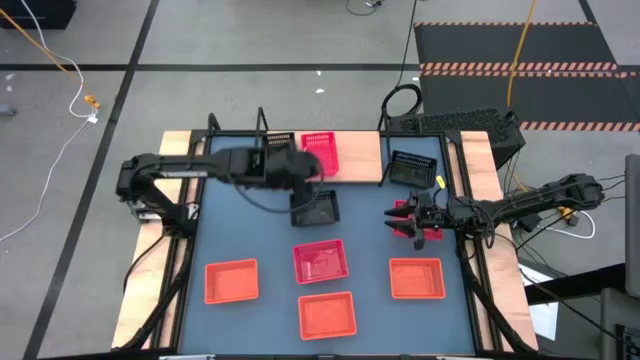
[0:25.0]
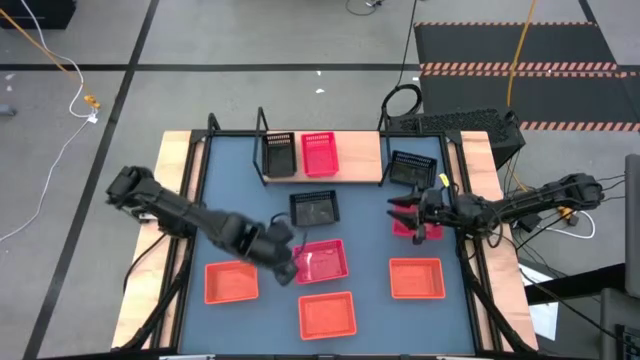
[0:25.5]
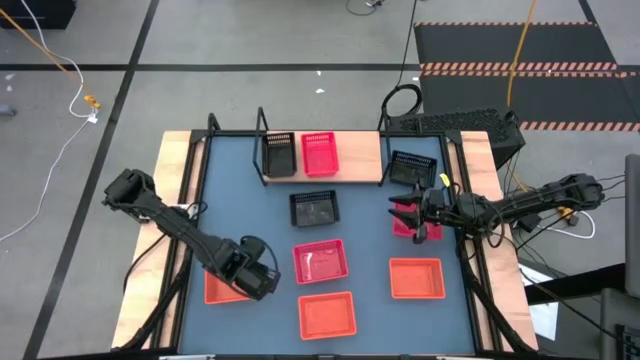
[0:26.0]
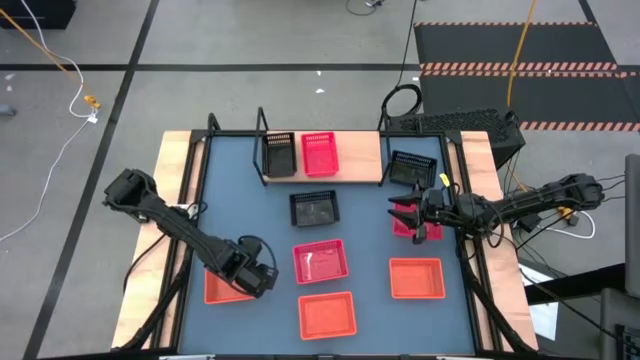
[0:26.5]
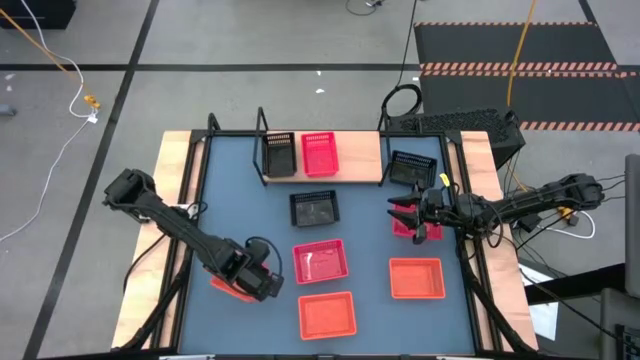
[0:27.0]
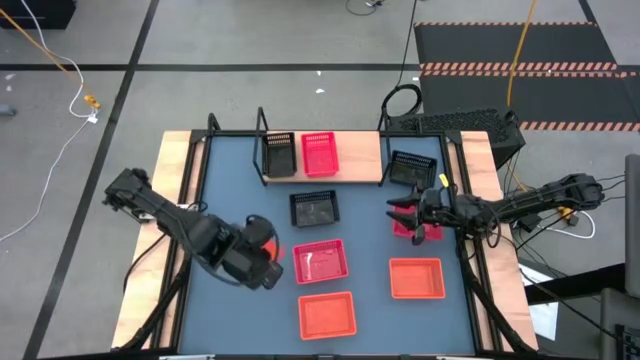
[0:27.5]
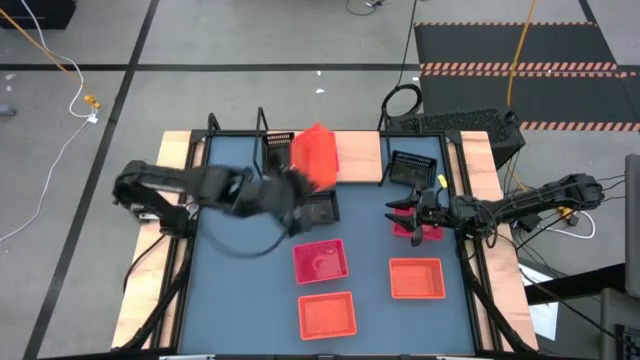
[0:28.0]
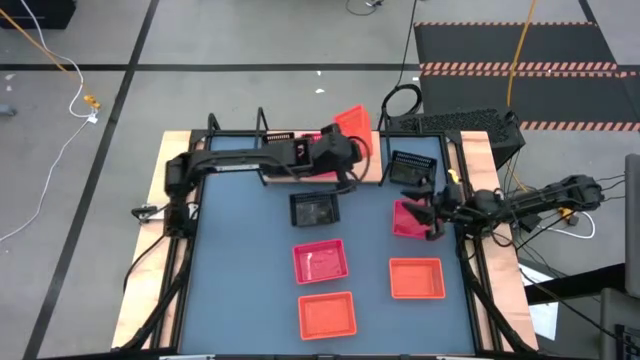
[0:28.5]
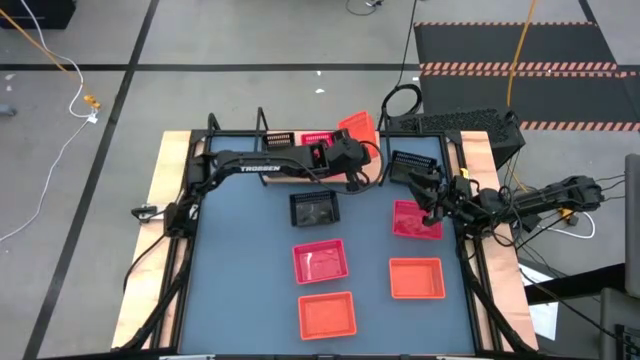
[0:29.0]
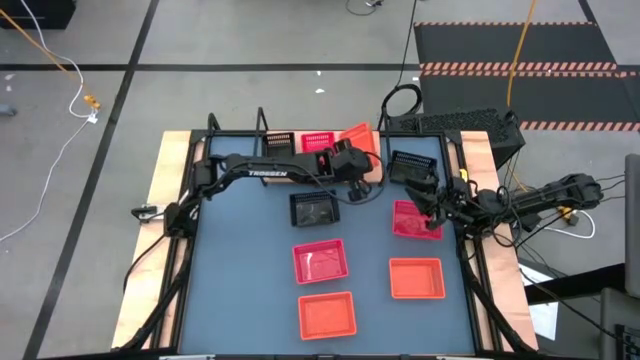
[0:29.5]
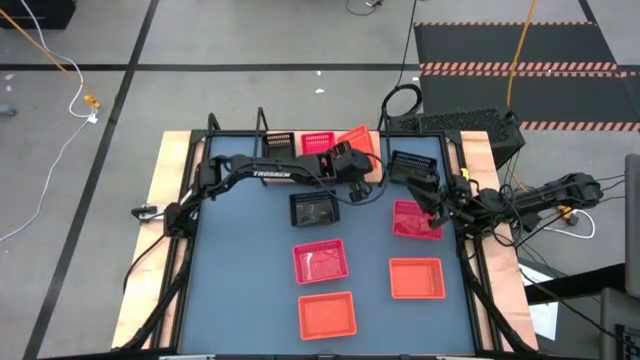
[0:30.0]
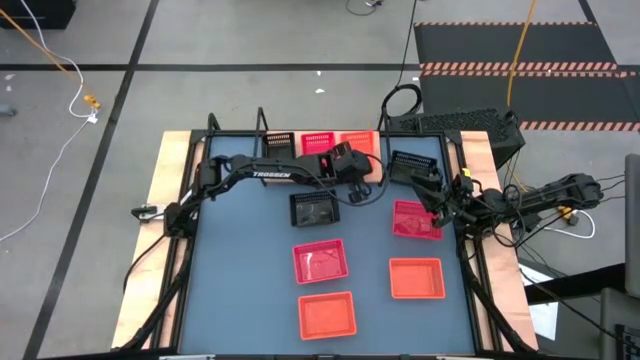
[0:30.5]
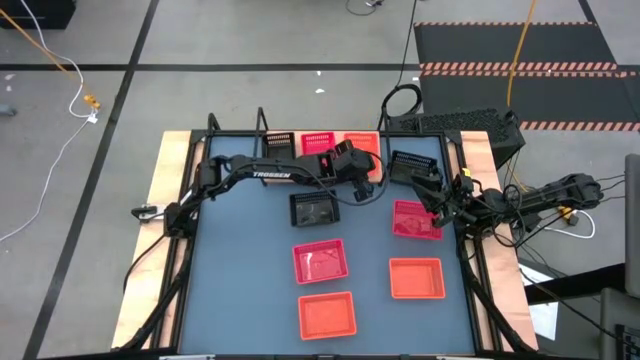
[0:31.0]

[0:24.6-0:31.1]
Task: Stack baskets on shelf by color
Put the left orange basket on the shelf

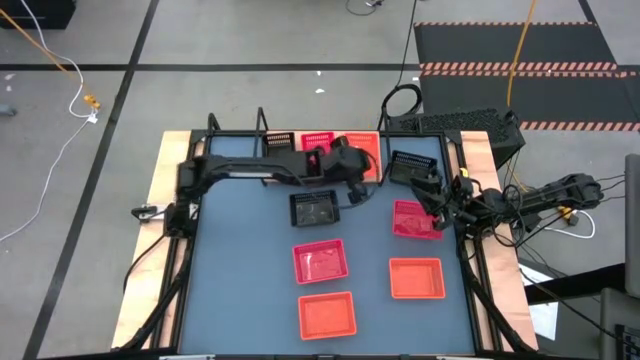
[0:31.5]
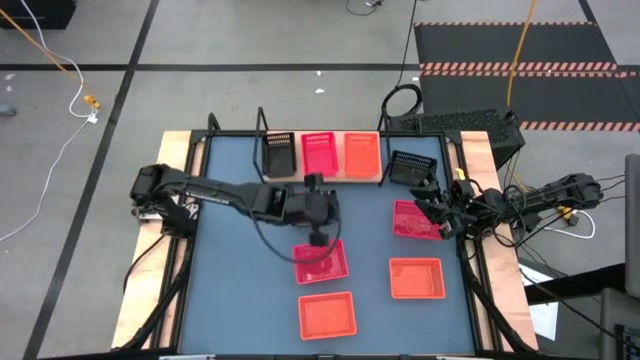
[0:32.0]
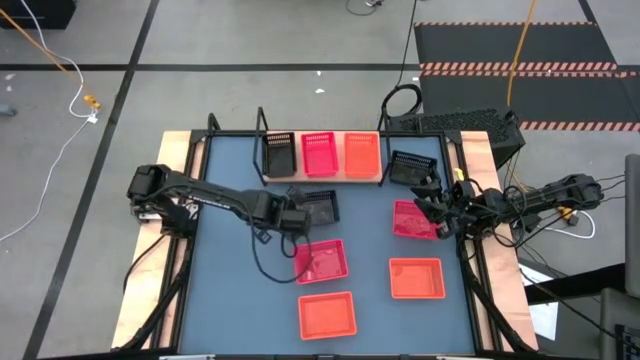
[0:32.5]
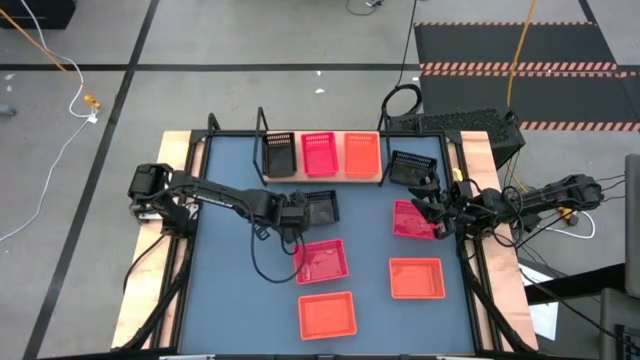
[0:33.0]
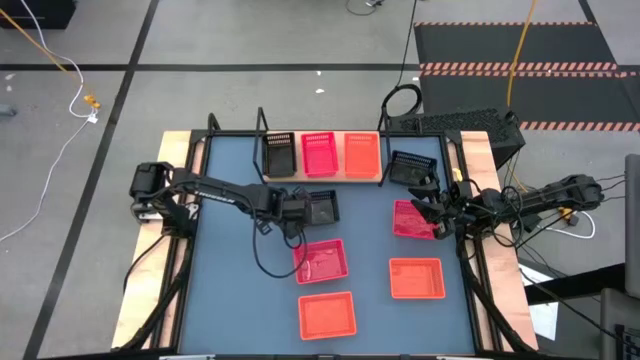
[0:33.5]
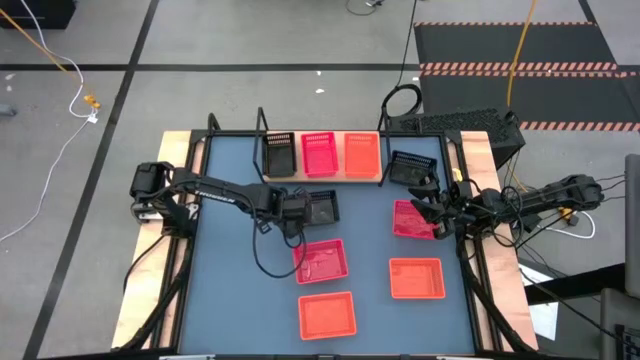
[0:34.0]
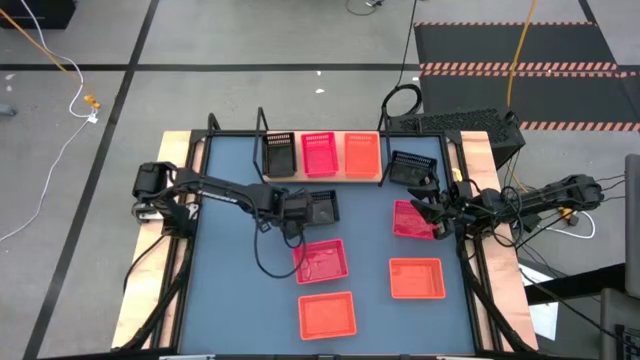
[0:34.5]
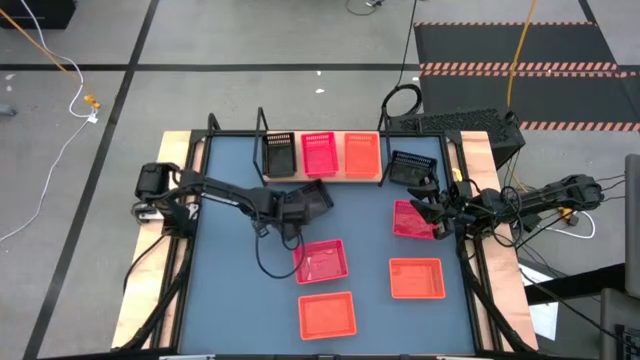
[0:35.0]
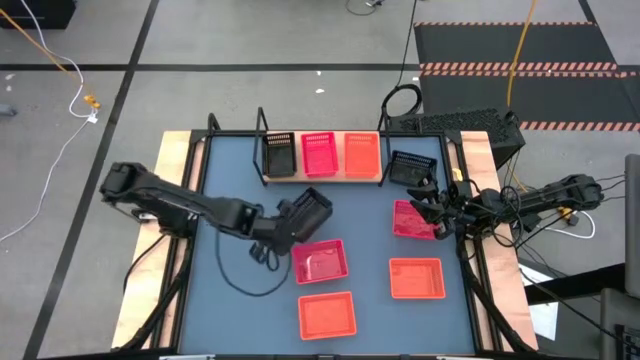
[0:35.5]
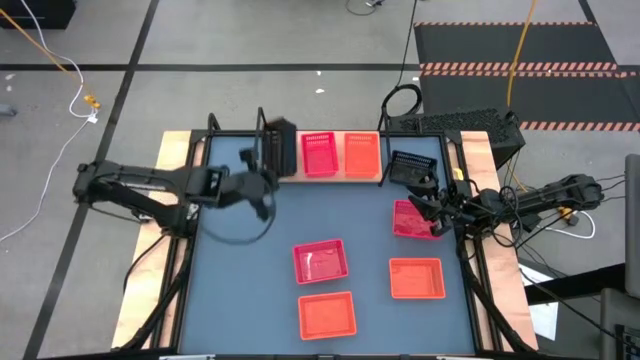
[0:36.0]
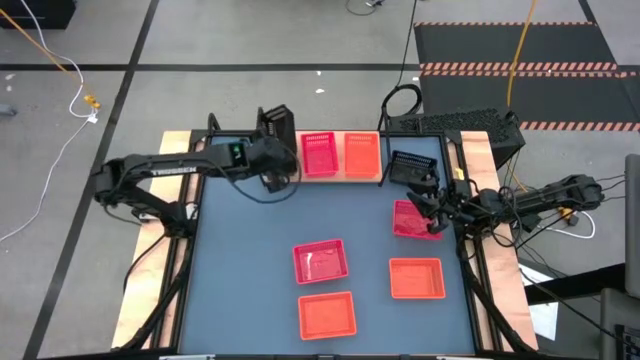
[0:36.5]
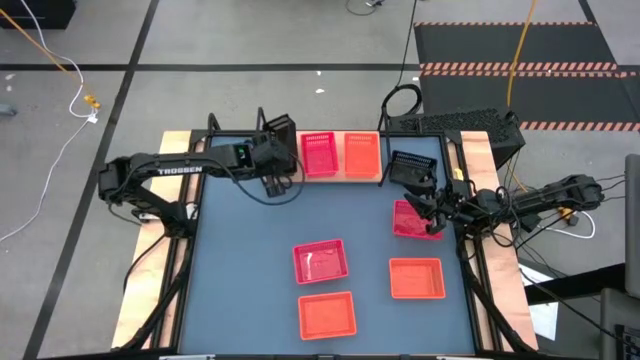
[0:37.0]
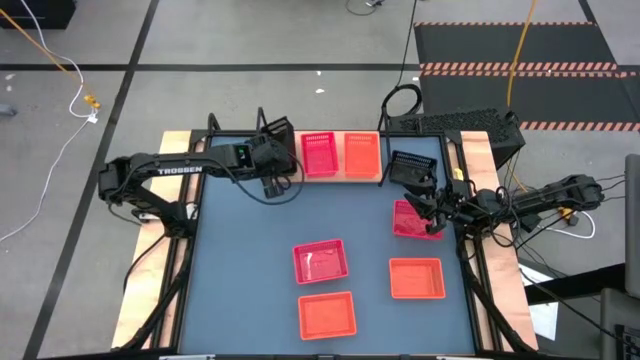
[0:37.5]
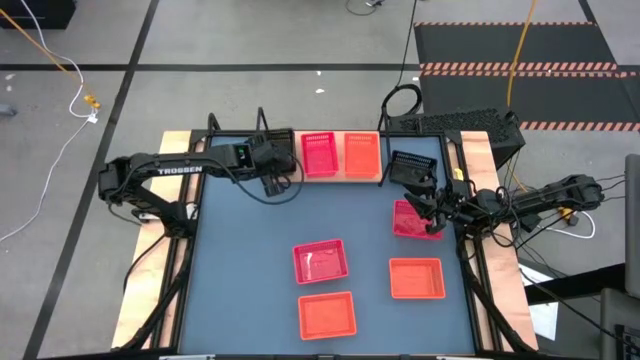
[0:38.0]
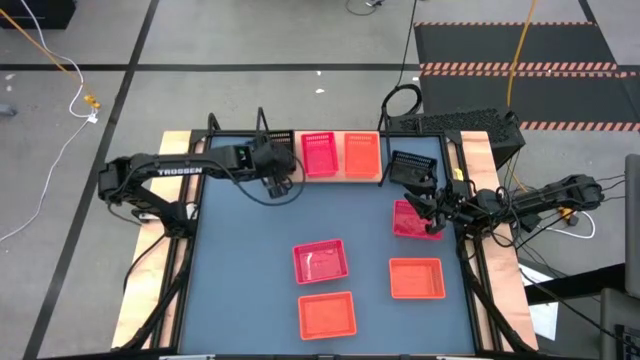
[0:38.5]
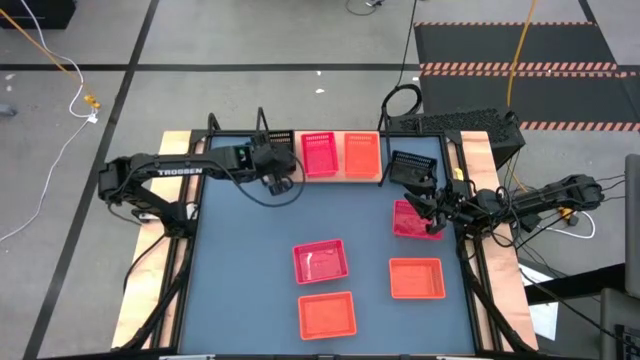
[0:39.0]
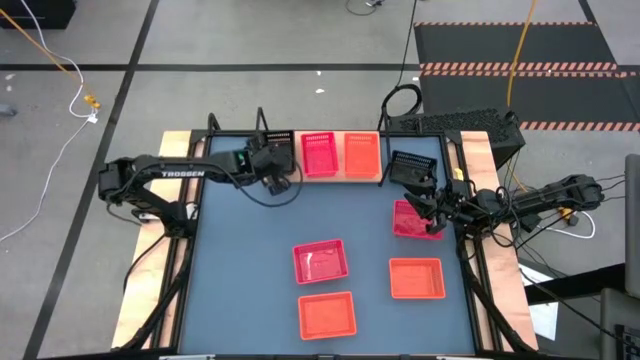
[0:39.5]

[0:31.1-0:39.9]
Stack the bottom black basket on top of the black basket on the shelf

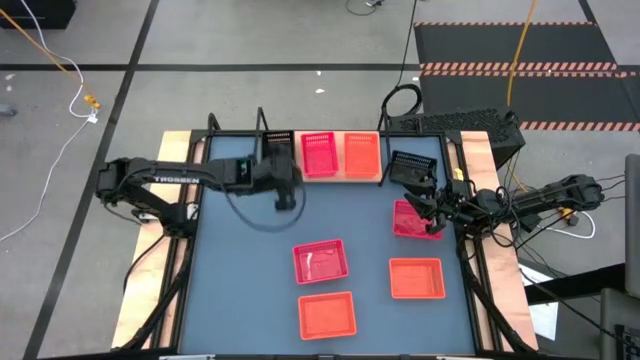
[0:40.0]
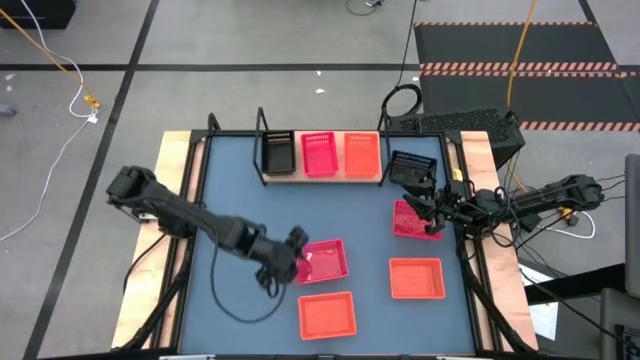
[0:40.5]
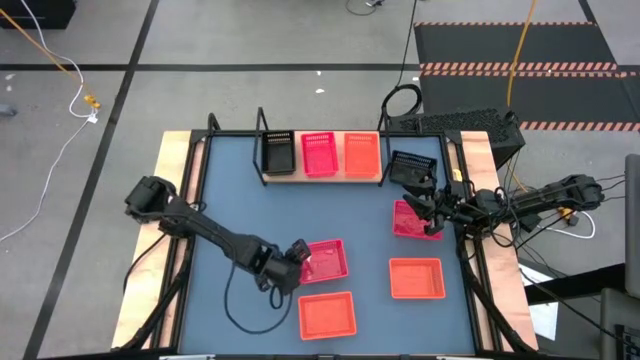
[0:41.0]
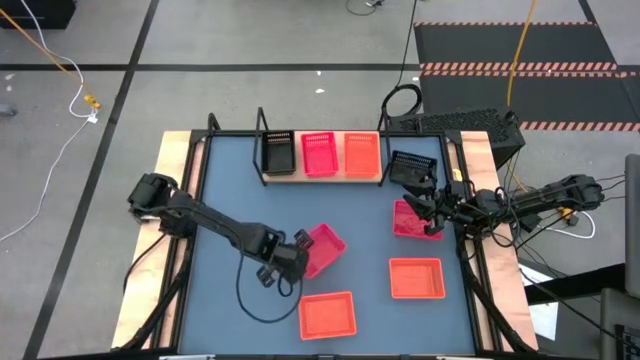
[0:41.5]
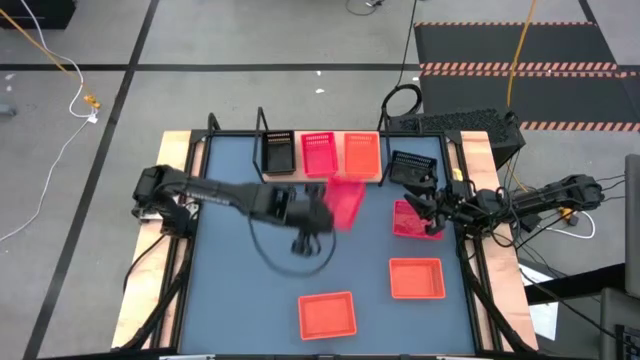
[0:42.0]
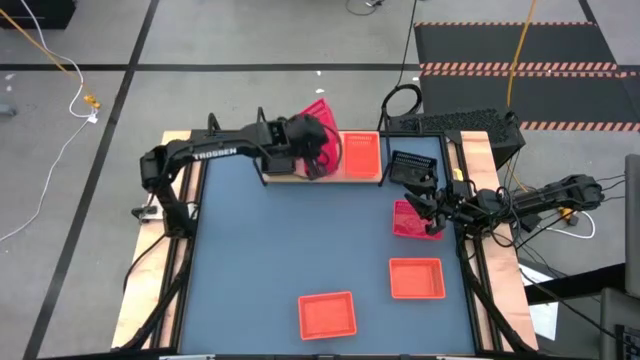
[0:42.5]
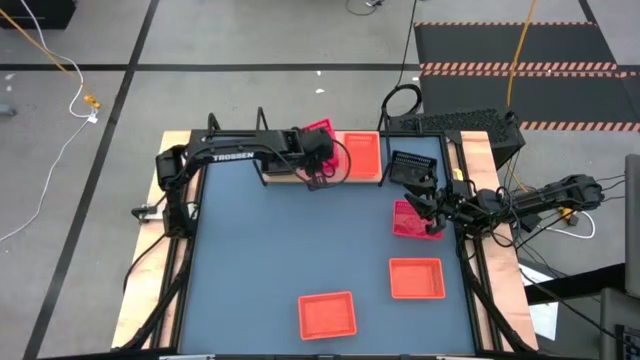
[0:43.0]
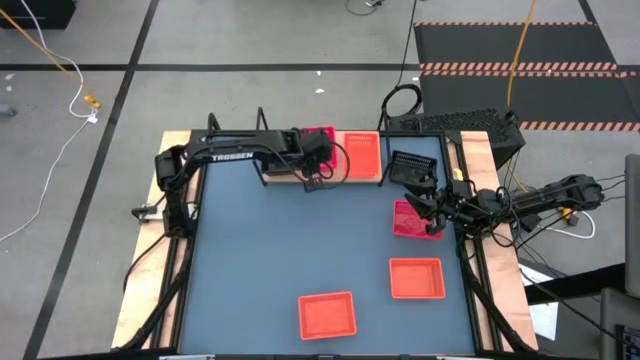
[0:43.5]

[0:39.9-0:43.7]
Stack the bottom red basket on top of the red basket on the shelf

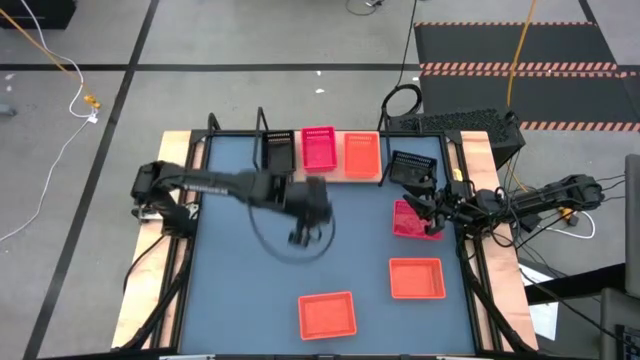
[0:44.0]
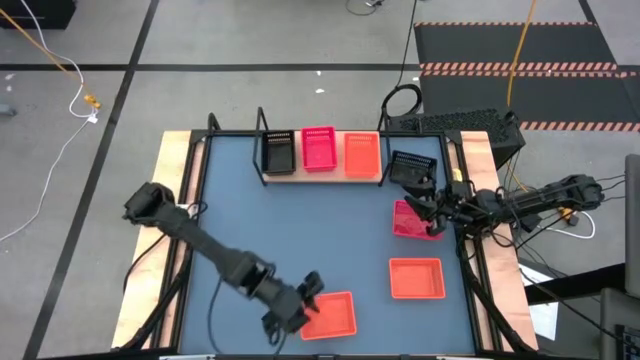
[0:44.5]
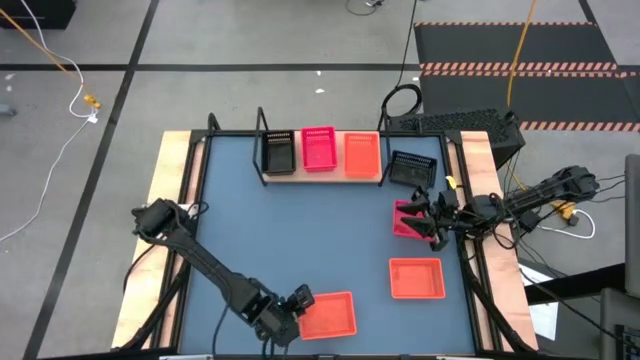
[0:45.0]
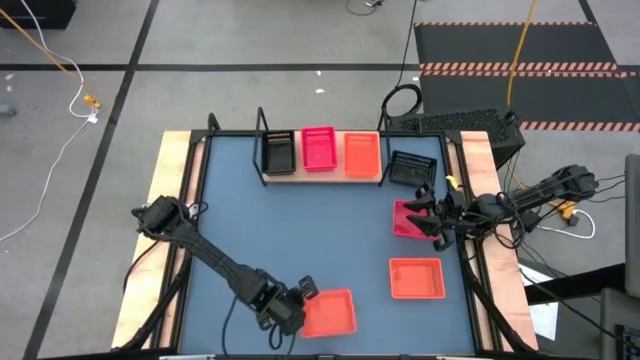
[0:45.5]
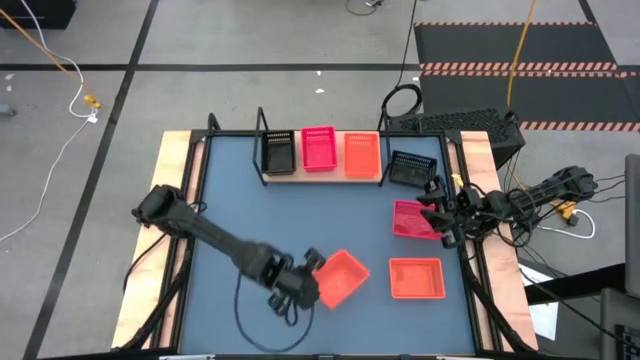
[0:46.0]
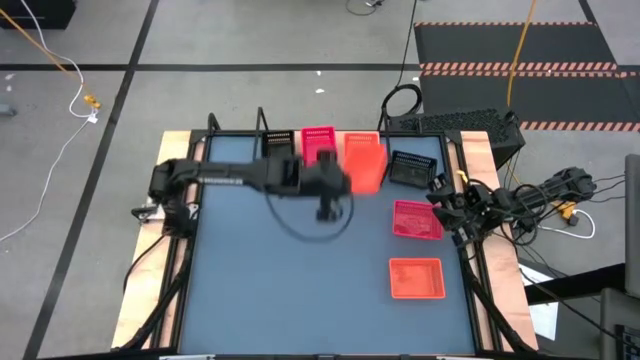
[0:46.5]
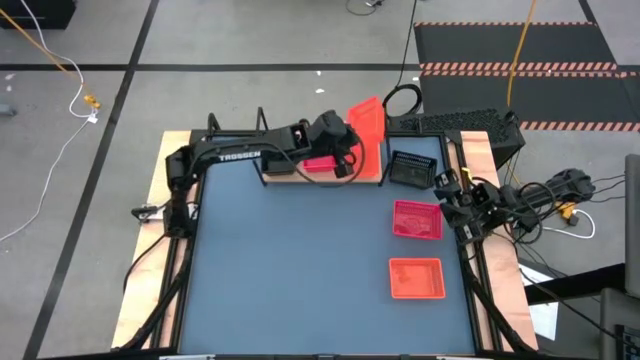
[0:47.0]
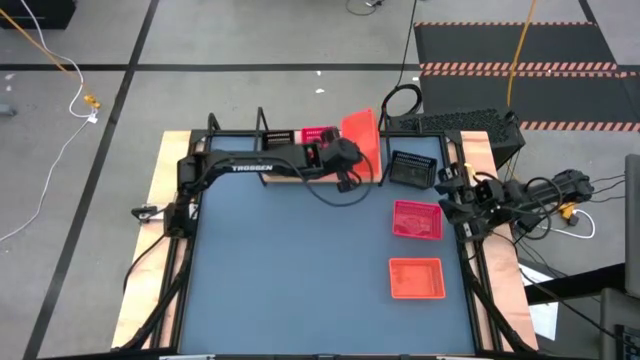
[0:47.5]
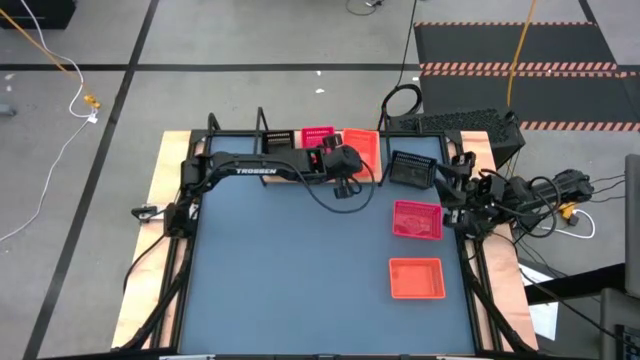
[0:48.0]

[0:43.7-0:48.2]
Stack the bottom orange basket on top of the orange basket on the shelf
